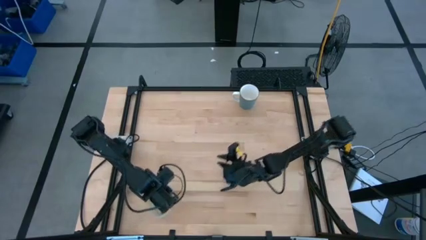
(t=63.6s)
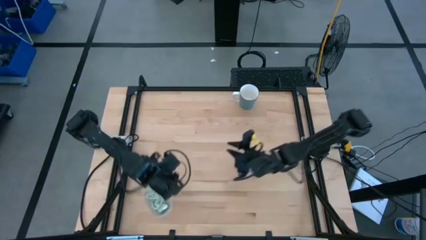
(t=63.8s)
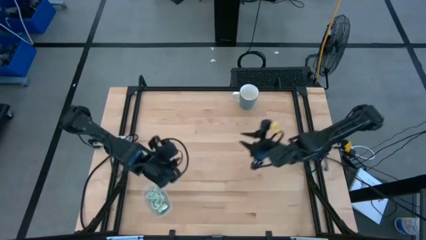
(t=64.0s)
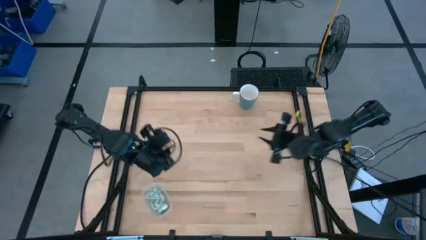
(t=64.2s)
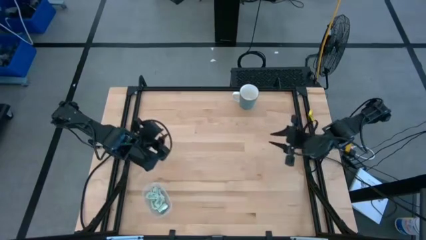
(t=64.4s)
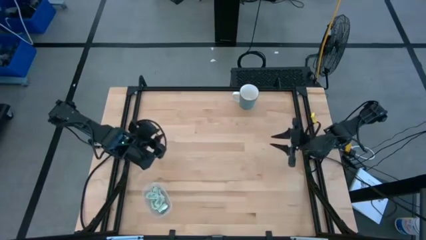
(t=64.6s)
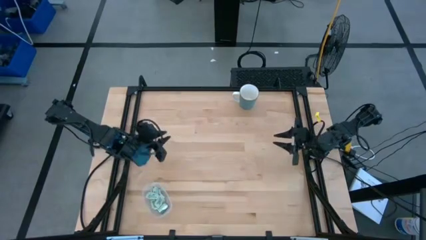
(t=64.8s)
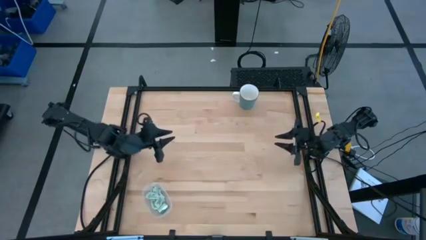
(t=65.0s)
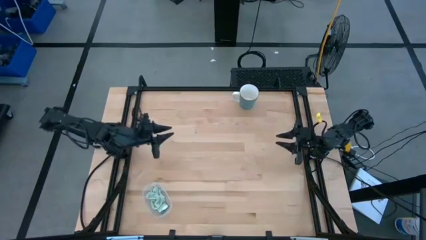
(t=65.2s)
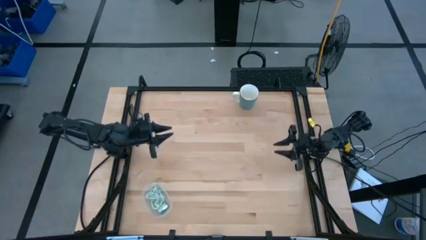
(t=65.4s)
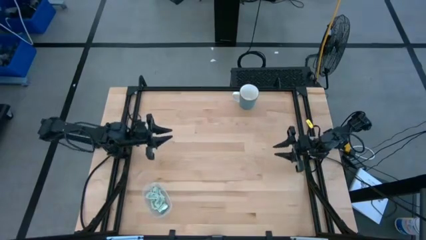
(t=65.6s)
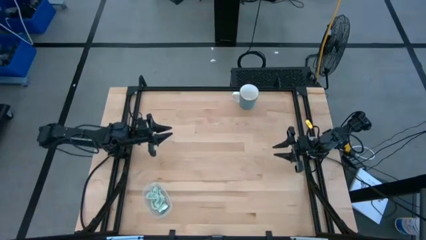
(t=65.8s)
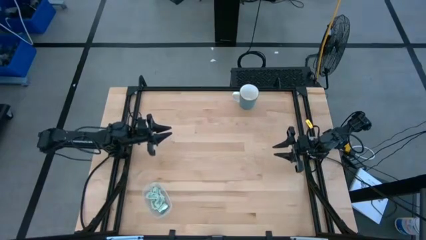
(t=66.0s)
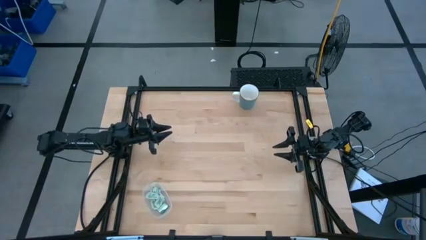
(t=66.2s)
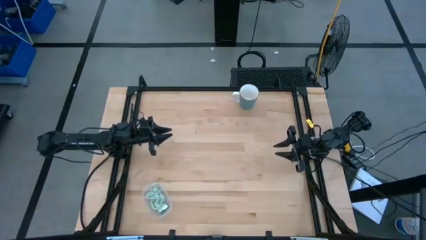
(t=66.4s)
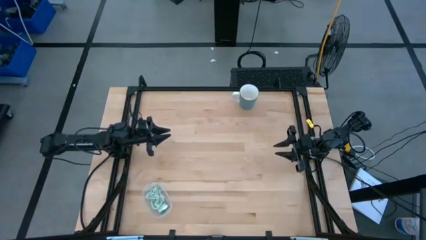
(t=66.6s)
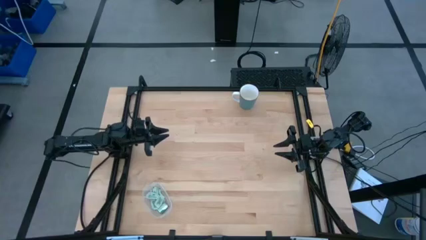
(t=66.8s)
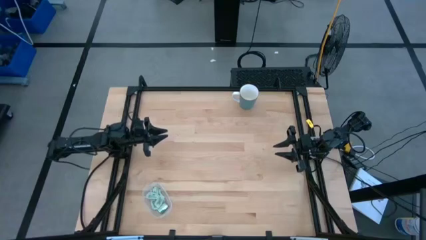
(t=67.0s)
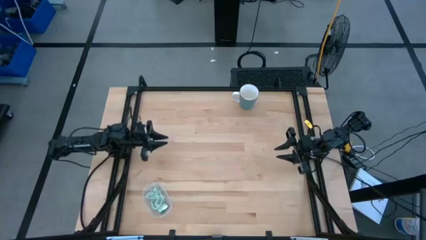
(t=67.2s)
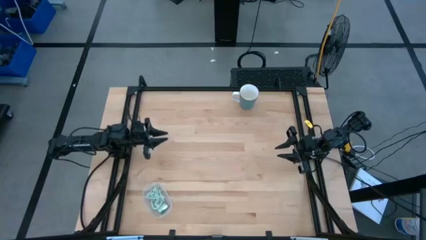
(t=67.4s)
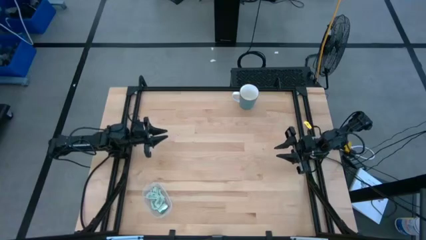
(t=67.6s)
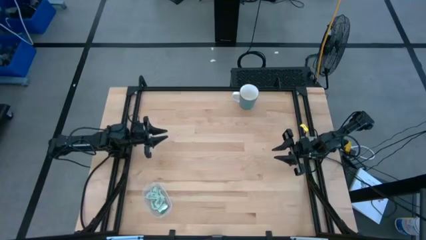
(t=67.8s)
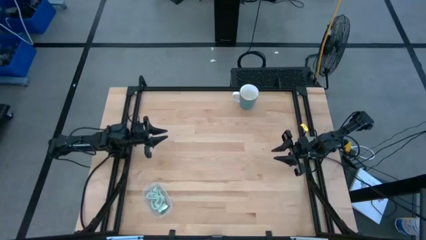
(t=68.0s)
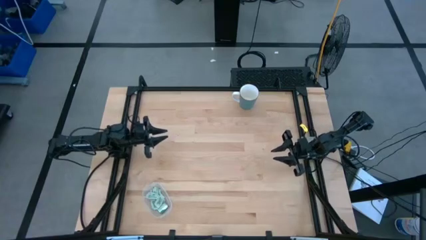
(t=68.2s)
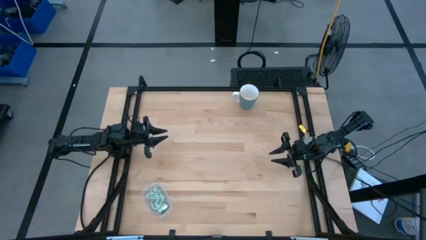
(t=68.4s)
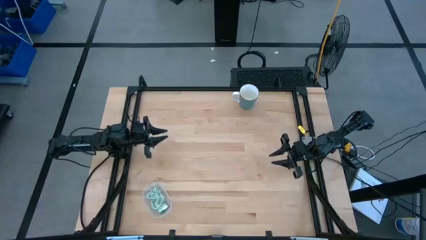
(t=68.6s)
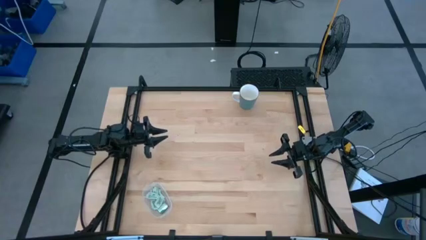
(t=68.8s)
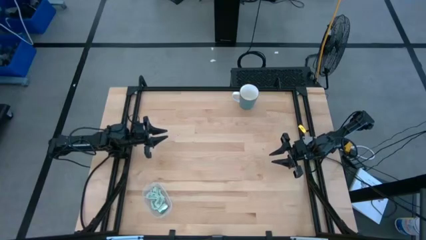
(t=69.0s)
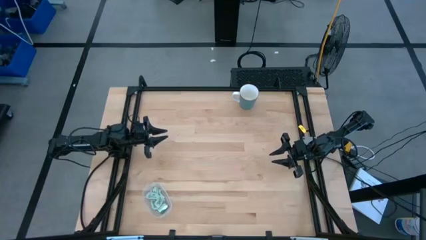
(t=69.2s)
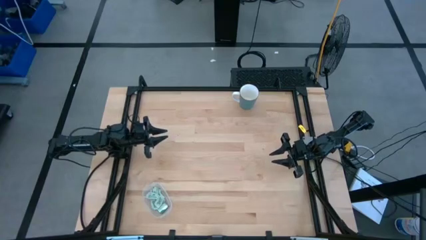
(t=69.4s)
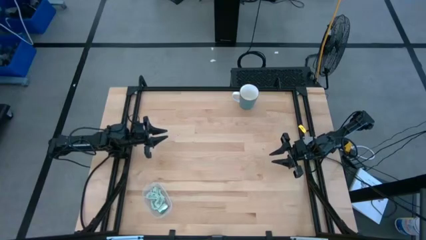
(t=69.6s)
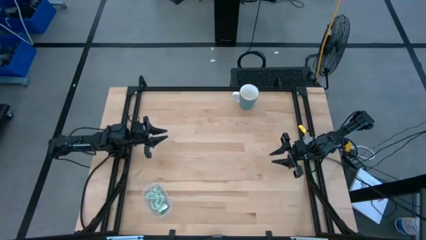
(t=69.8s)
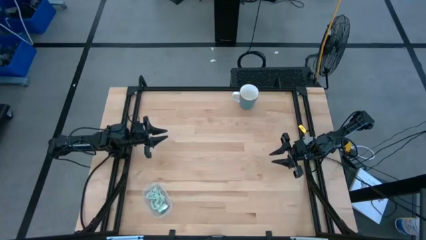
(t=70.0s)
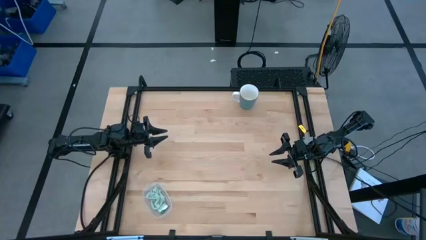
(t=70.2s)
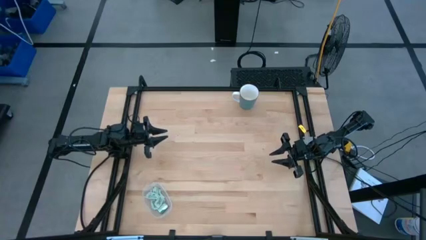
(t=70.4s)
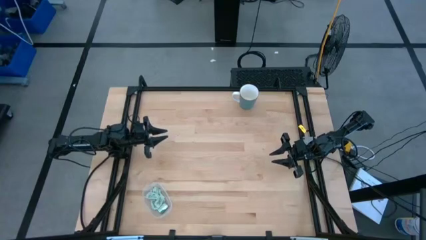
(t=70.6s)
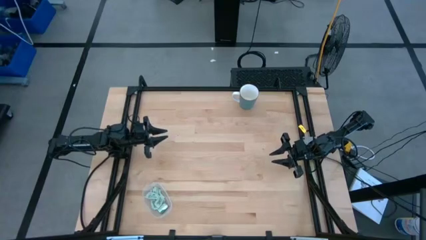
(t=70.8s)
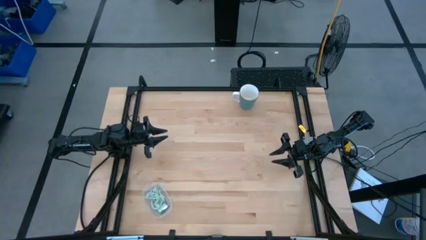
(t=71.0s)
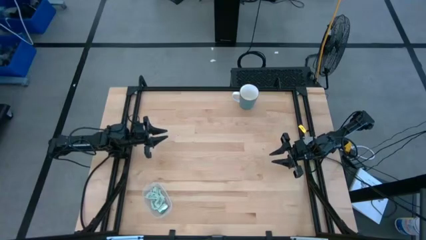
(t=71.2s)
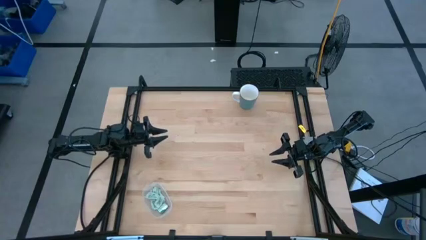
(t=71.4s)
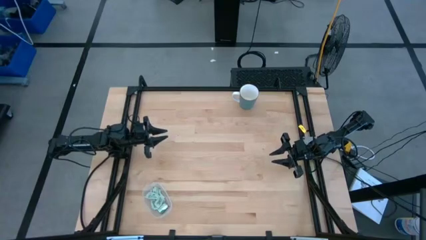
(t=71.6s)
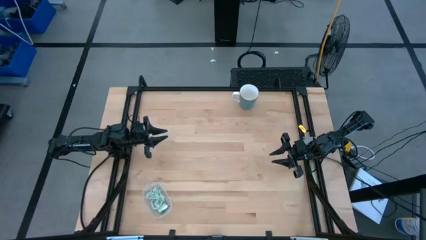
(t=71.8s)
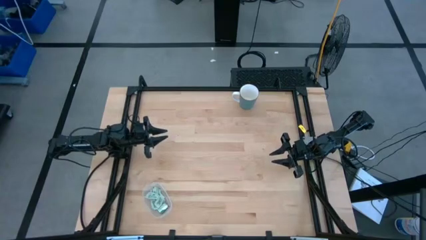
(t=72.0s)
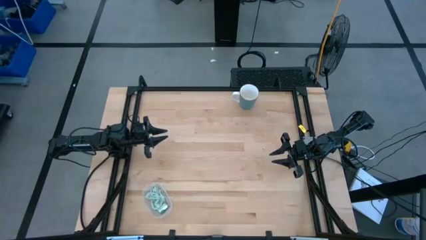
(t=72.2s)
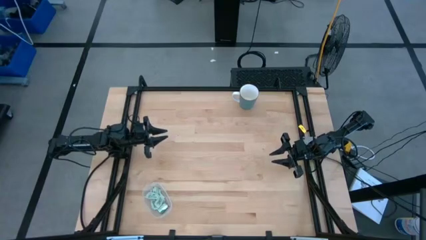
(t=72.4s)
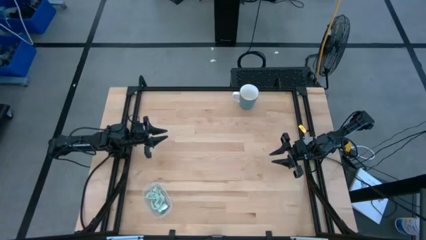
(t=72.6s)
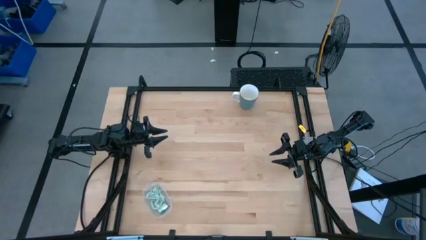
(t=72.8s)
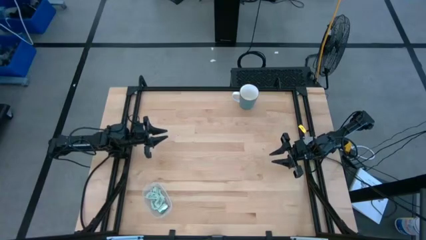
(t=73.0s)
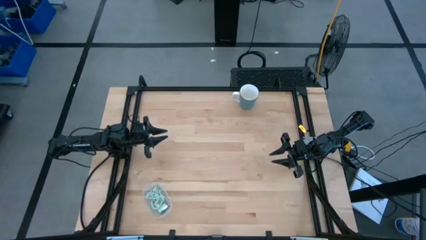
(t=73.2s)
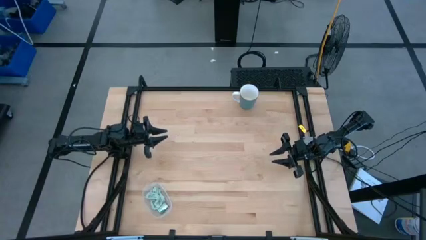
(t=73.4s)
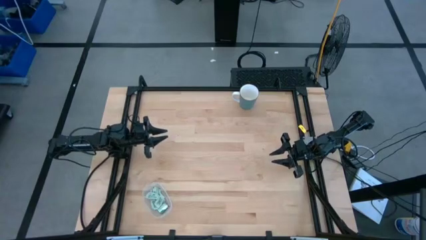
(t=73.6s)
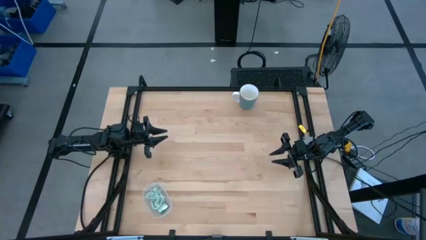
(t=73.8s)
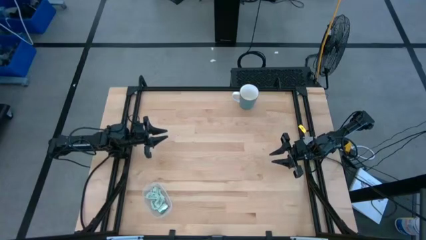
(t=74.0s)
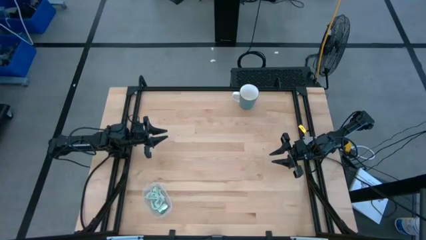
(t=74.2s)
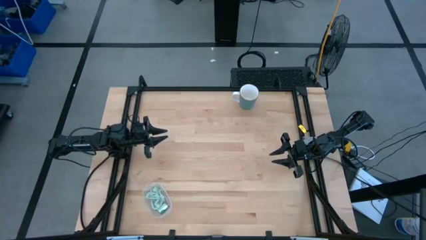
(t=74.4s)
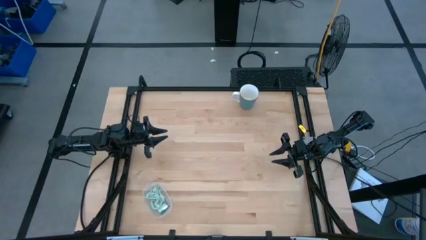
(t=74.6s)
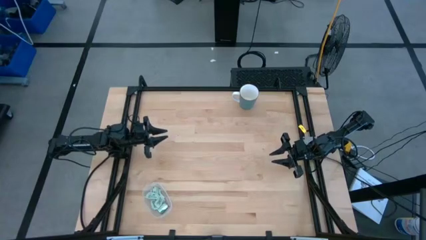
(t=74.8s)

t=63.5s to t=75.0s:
Task: Pick and place Stevia / Truvia into bins
Return to Home Position

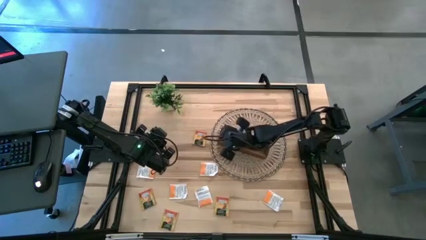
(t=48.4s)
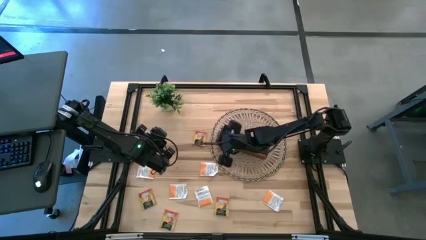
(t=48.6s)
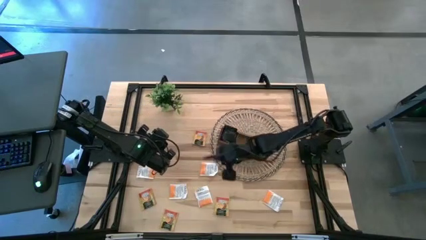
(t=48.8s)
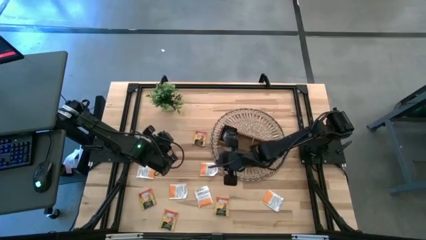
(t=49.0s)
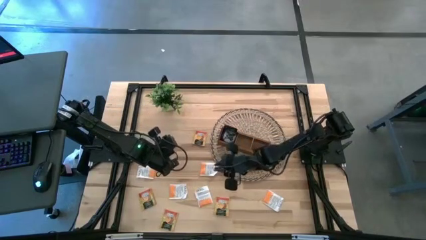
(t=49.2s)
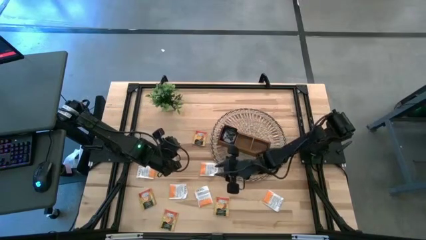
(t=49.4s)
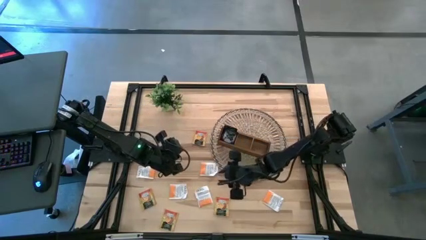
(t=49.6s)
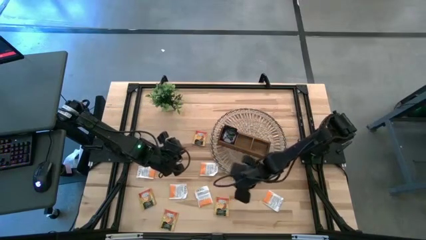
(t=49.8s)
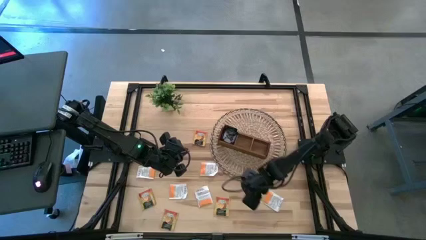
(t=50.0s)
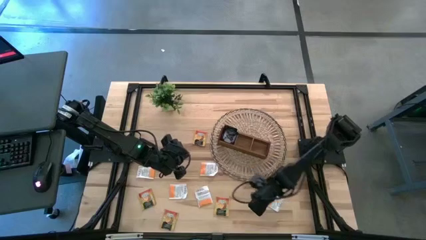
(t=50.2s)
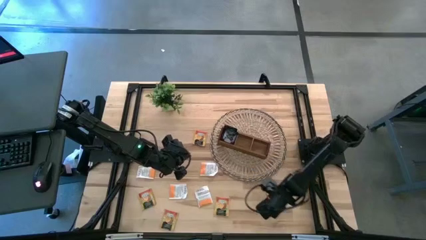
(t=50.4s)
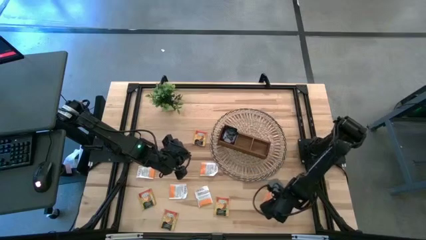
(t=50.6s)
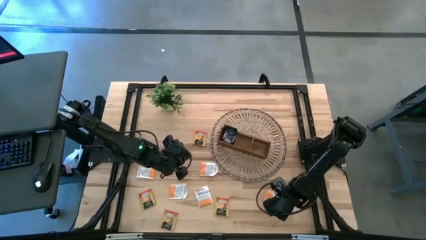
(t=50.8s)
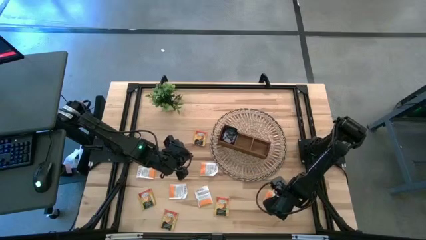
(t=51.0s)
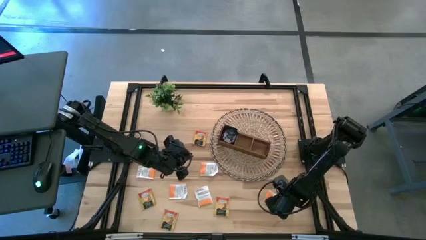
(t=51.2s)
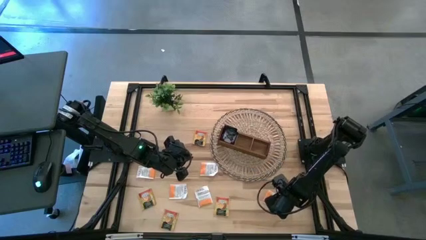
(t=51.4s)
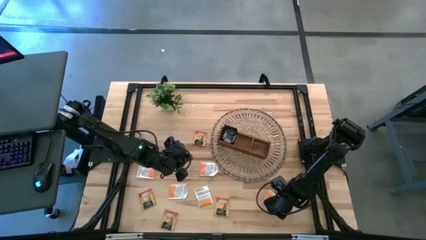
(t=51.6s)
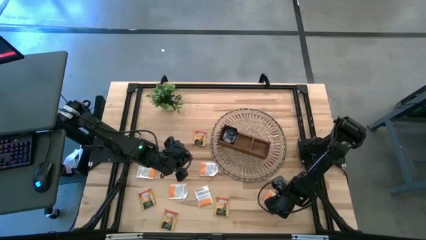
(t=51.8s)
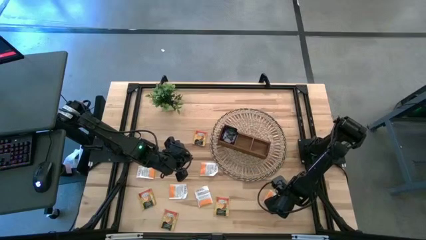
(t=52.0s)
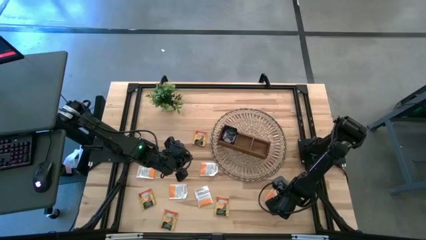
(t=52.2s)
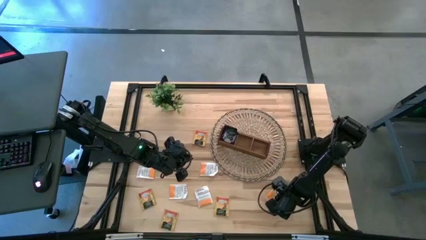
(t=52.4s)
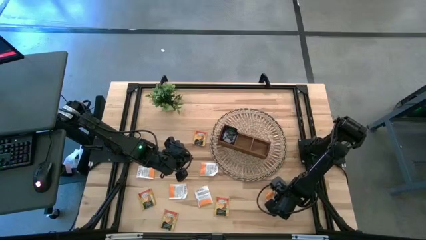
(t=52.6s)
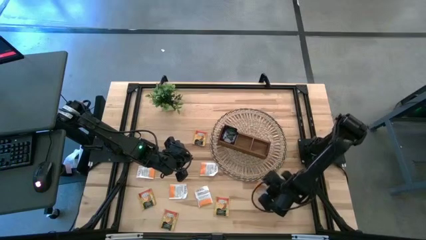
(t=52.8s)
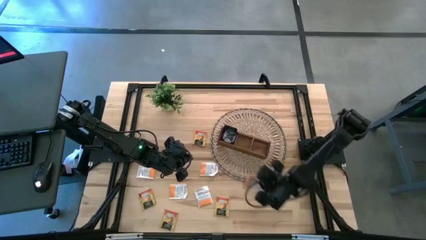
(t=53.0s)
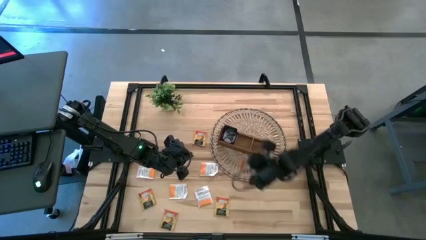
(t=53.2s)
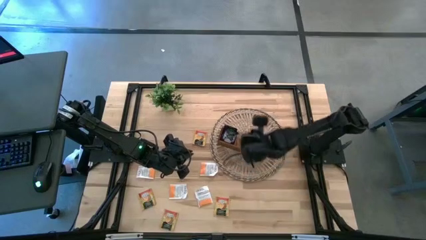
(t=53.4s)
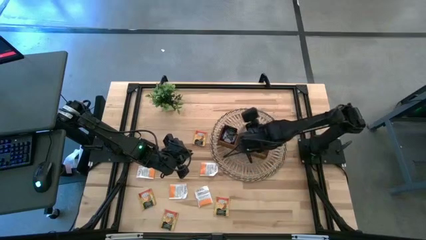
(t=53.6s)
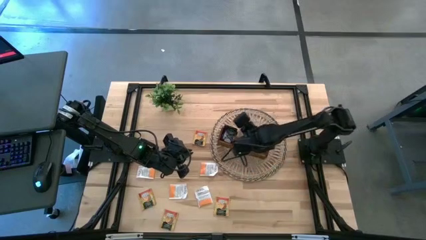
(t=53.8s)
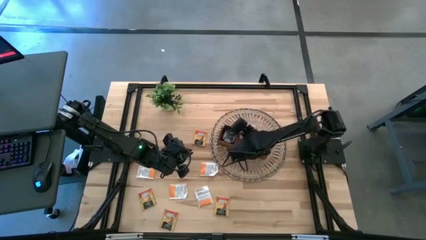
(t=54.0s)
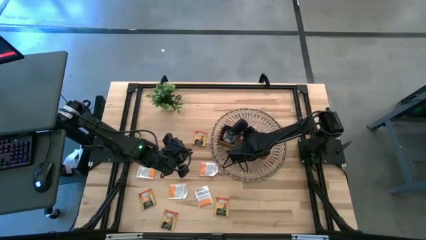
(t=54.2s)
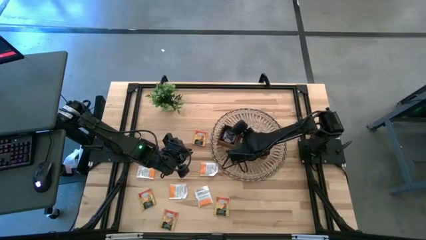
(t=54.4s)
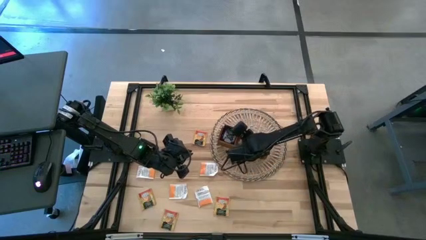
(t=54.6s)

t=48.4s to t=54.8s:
Task: Pick & Place Tea
Put the white tea bag into the middle section of the wooden organizer
